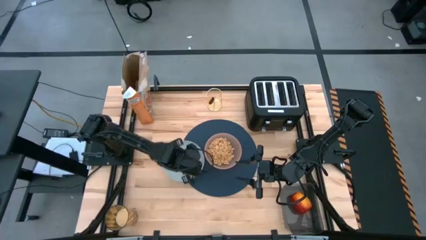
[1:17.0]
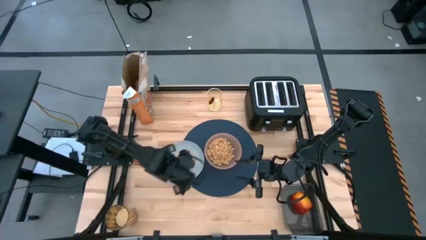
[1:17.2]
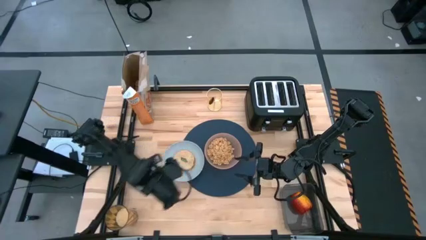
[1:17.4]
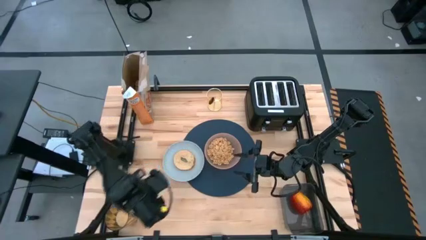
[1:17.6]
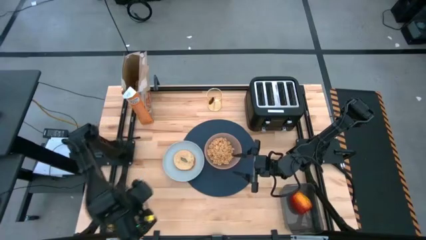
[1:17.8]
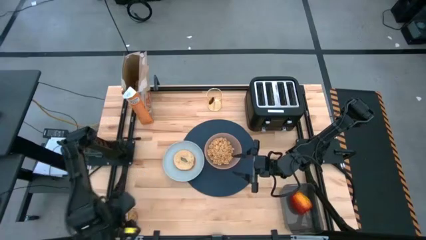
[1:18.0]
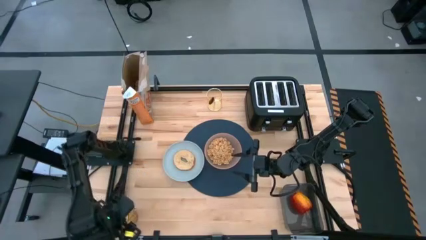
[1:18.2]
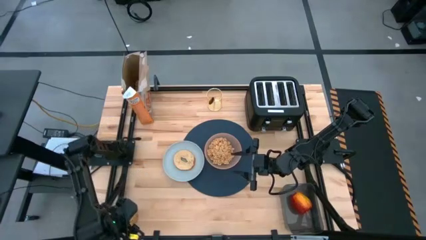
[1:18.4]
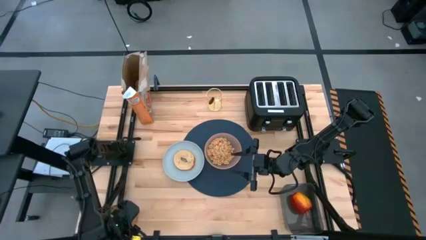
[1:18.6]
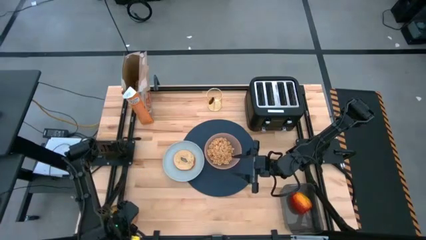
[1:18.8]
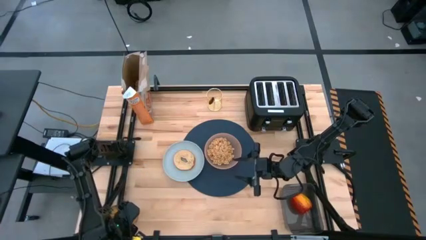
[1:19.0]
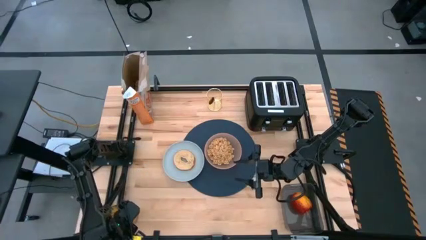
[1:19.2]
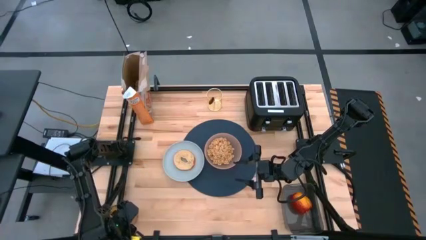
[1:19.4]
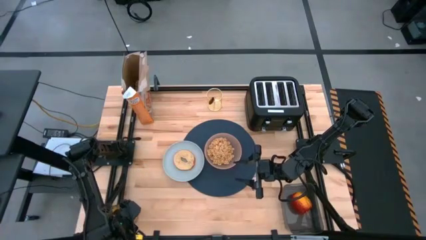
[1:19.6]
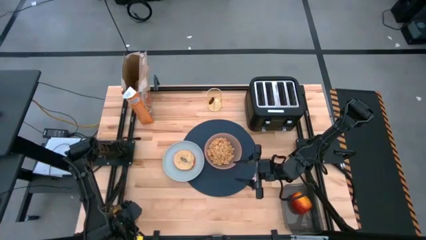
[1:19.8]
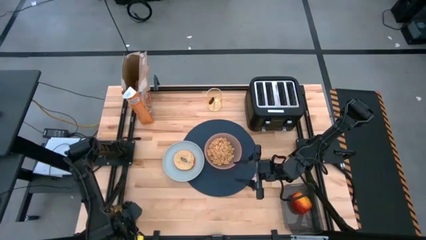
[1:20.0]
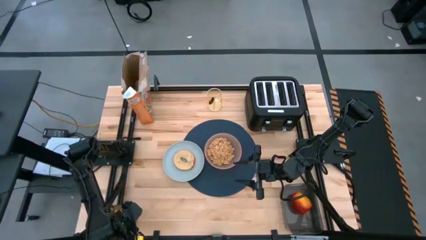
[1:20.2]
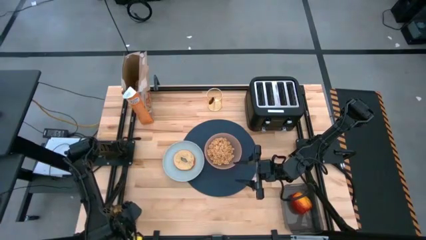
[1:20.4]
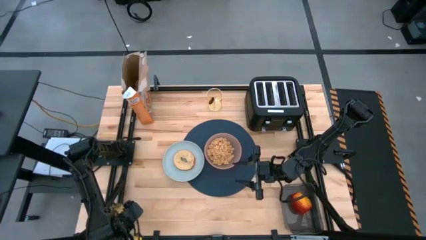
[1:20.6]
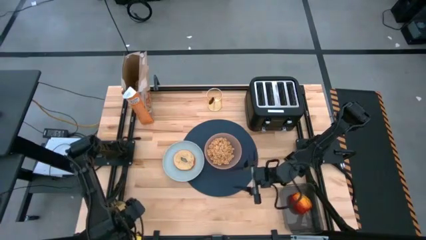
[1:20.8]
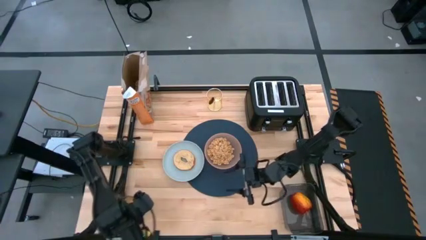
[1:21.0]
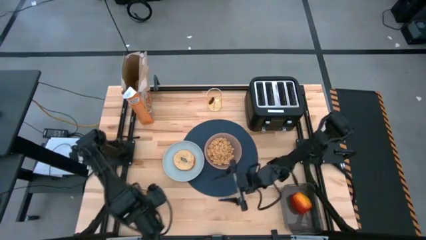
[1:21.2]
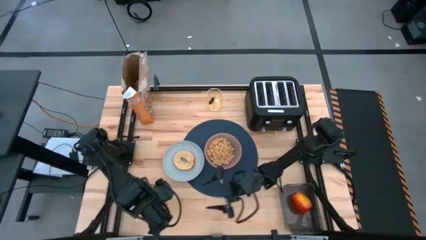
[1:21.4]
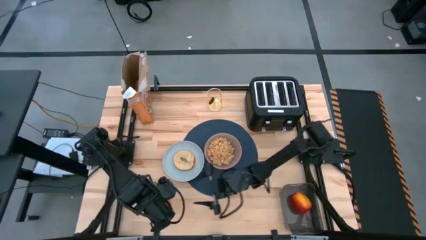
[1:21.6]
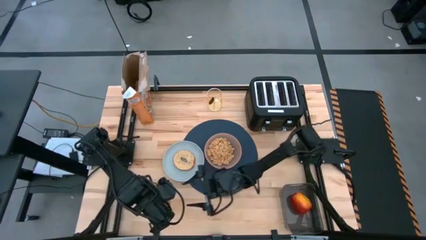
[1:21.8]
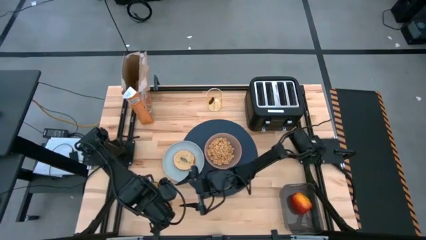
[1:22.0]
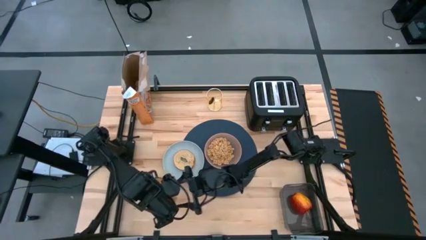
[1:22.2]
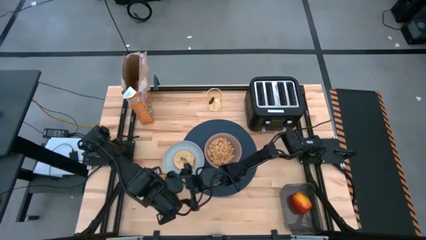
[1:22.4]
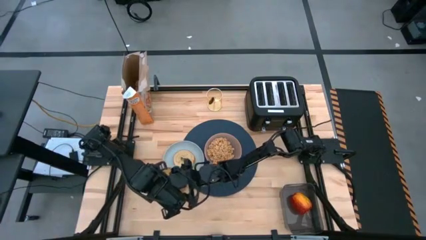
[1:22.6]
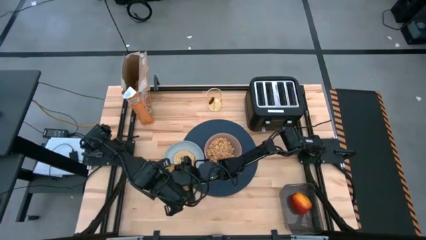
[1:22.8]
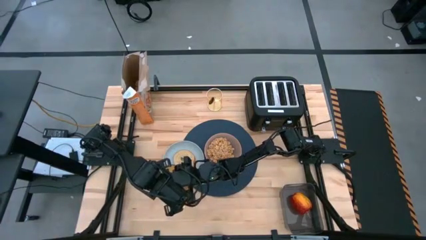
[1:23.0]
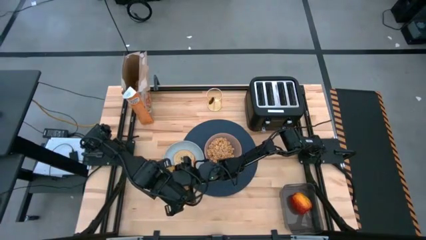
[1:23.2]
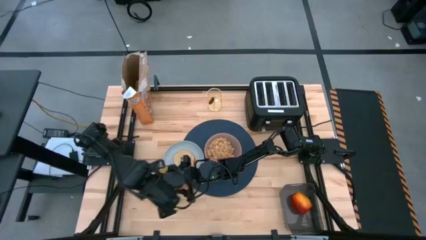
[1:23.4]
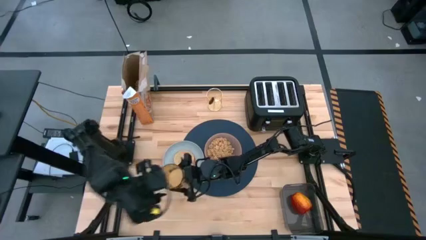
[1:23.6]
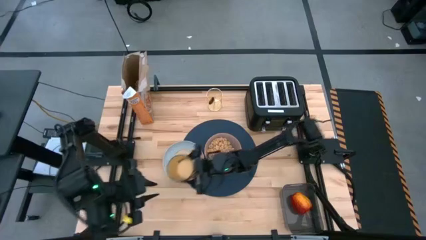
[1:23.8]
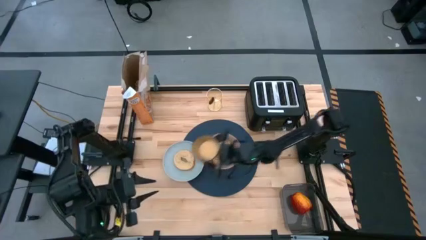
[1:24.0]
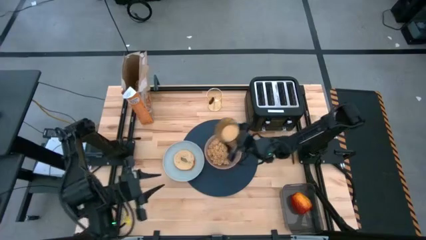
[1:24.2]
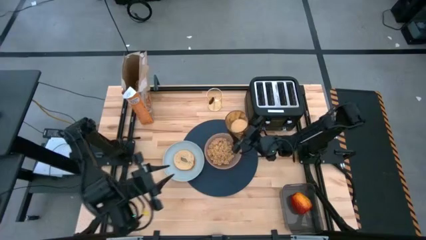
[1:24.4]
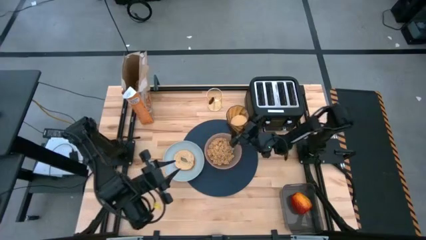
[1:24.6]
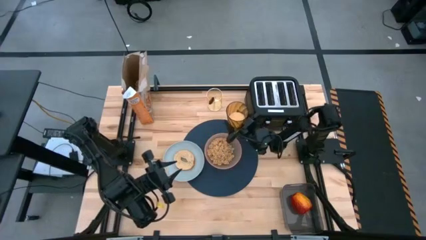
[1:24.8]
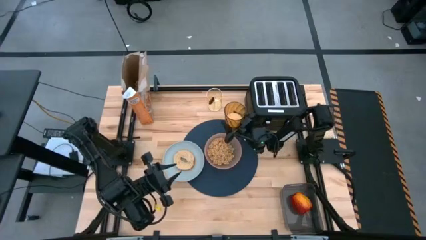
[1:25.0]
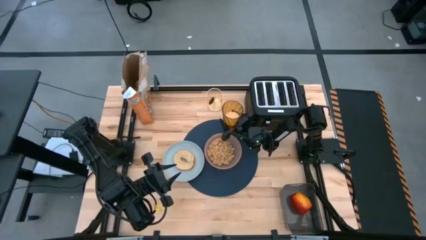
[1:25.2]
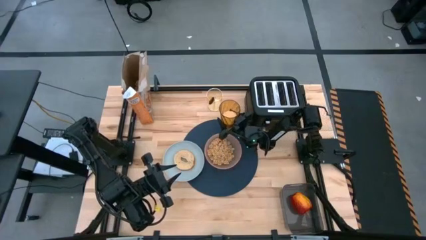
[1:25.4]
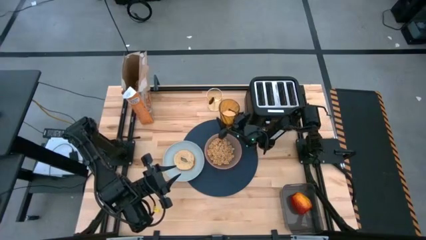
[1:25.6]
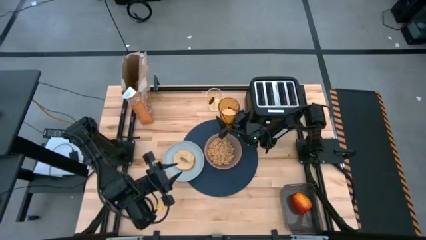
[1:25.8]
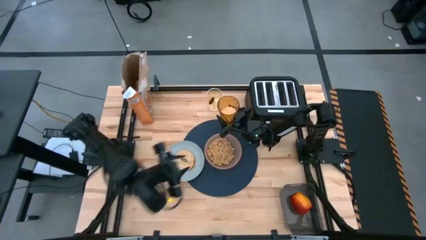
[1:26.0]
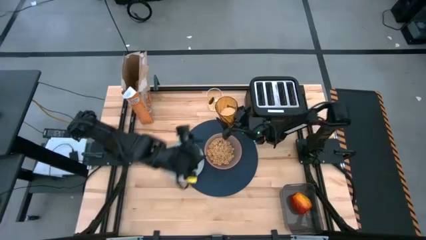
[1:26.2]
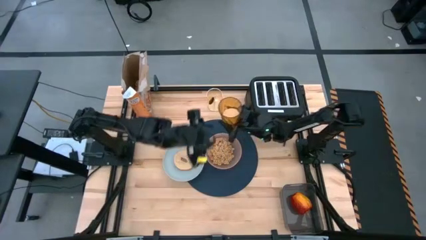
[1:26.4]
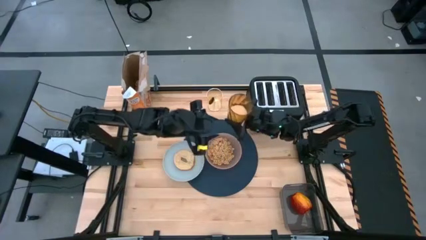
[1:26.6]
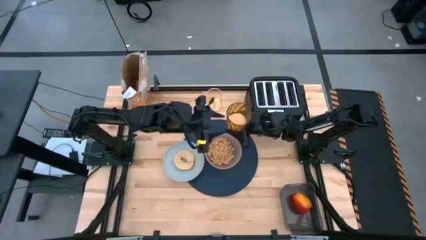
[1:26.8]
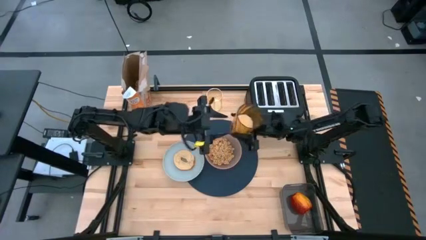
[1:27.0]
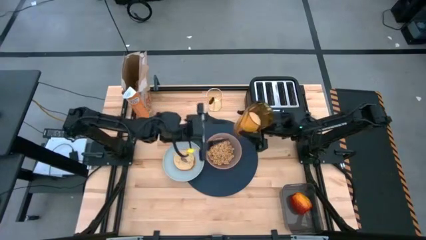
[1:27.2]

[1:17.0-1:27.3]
Task: Arrange a breakfast setting
Put the yellow cup on the top right of the orange bowl
